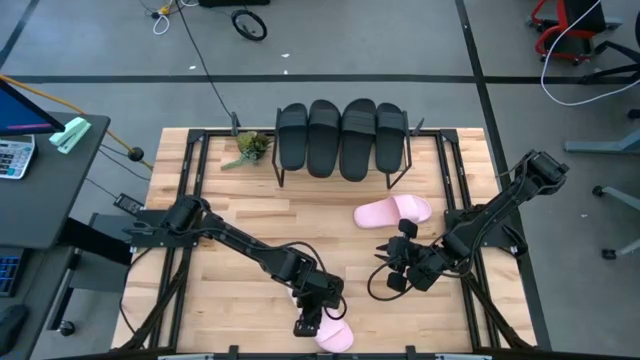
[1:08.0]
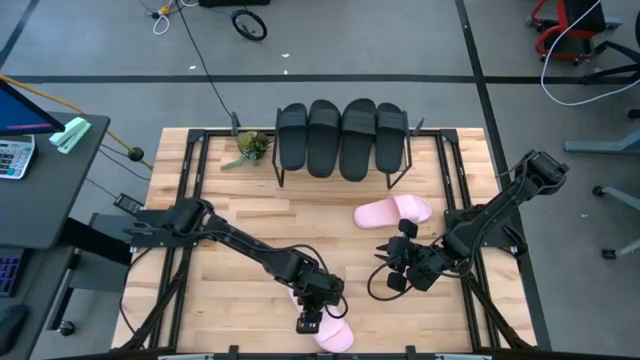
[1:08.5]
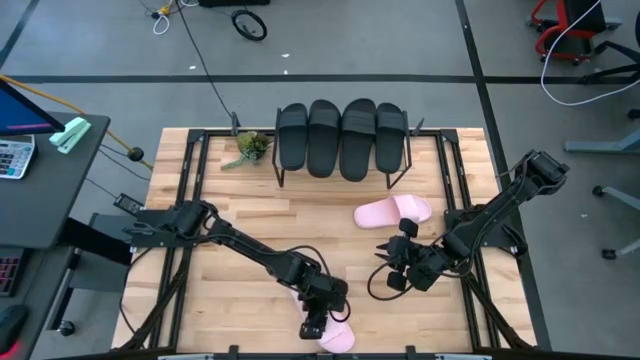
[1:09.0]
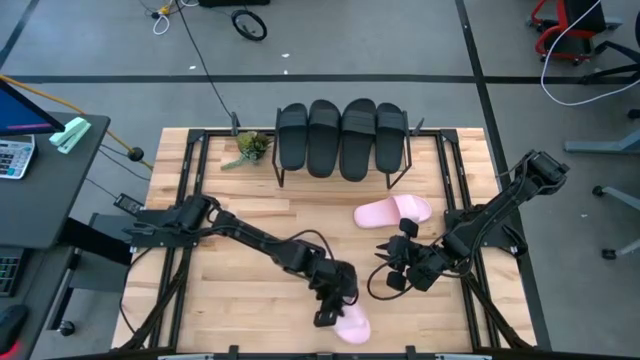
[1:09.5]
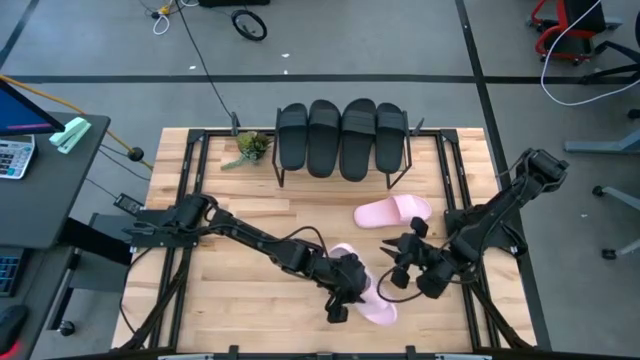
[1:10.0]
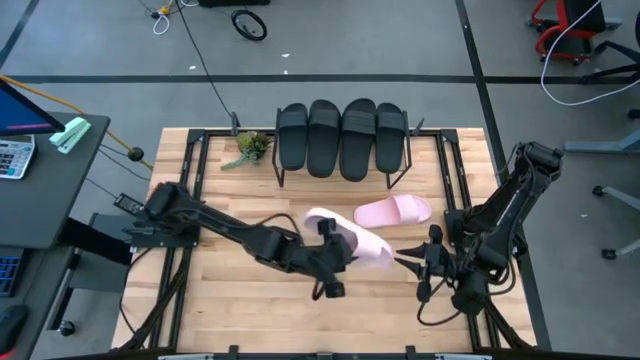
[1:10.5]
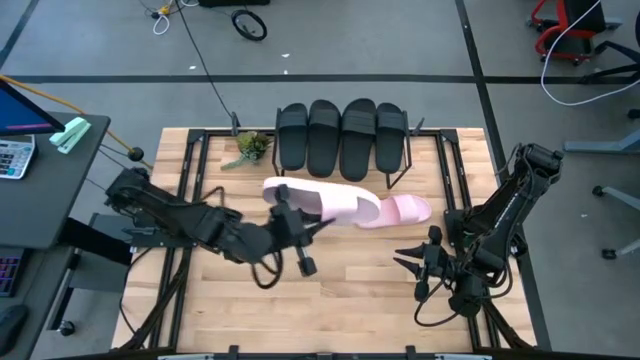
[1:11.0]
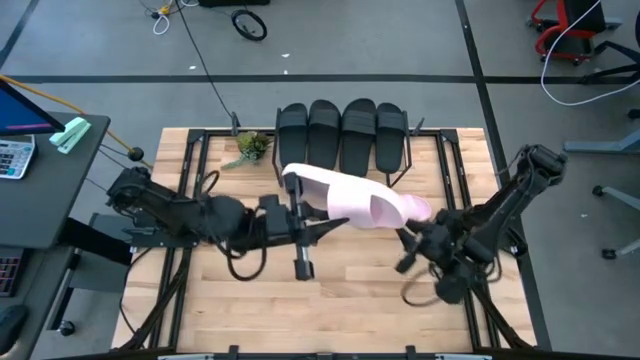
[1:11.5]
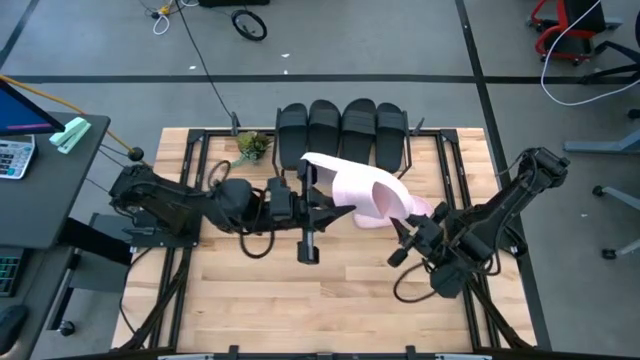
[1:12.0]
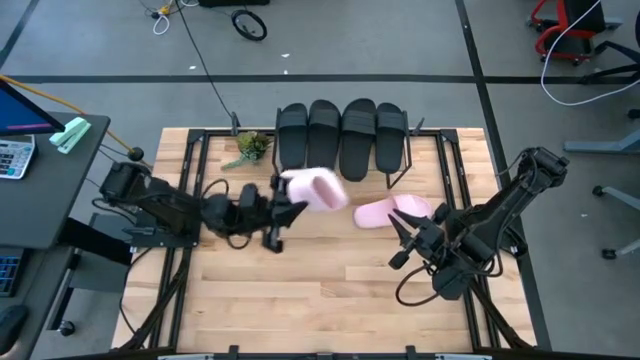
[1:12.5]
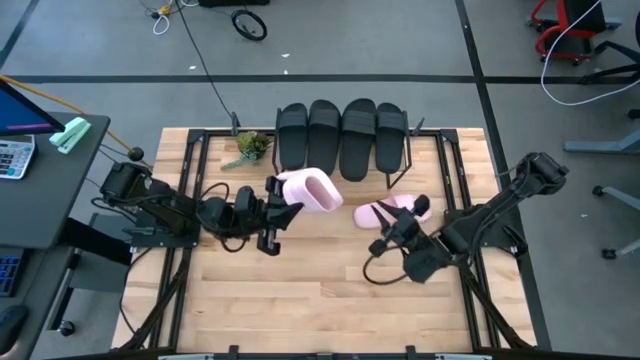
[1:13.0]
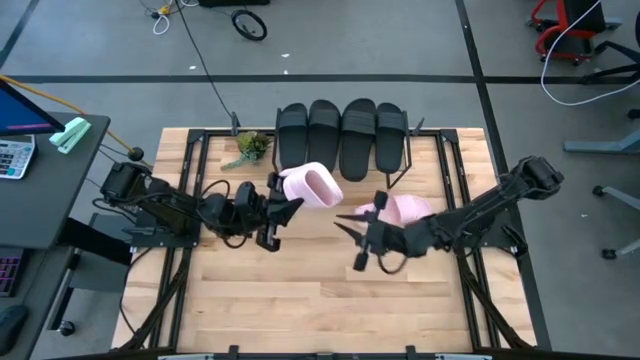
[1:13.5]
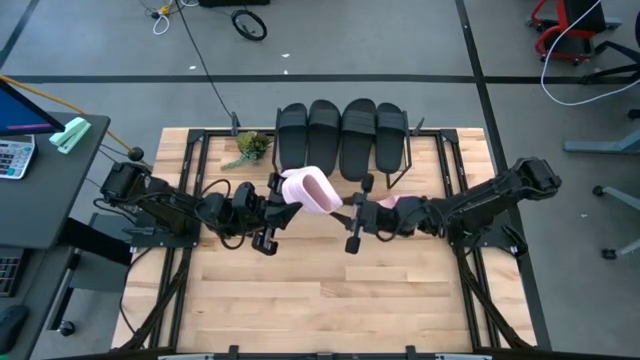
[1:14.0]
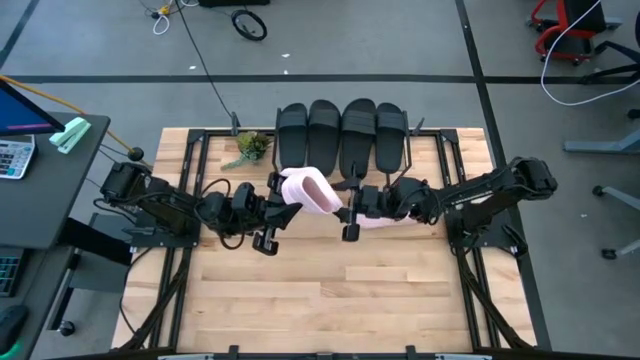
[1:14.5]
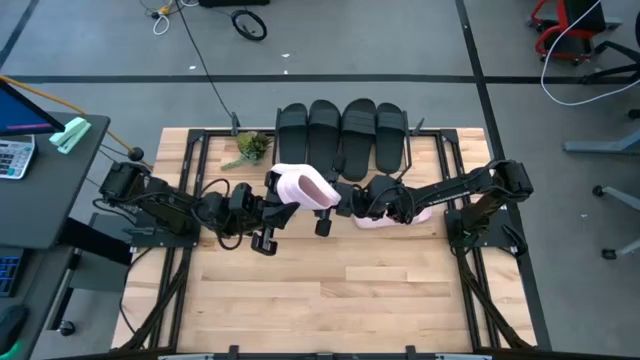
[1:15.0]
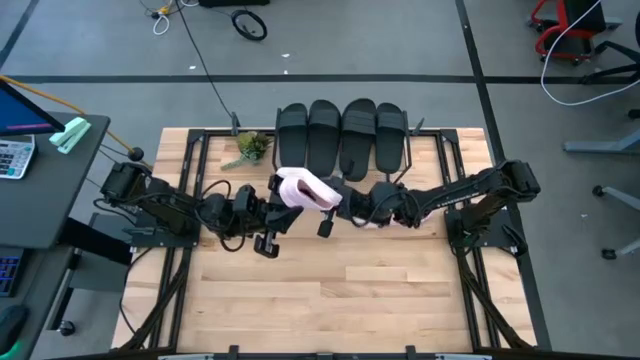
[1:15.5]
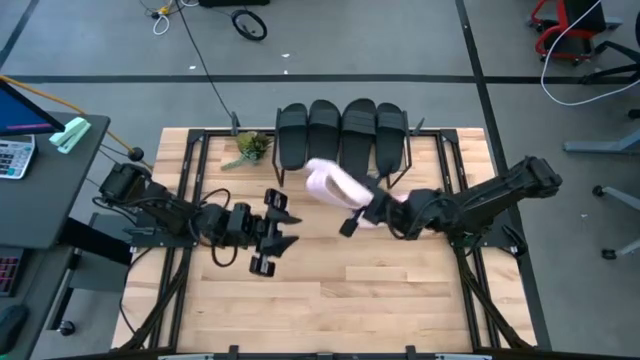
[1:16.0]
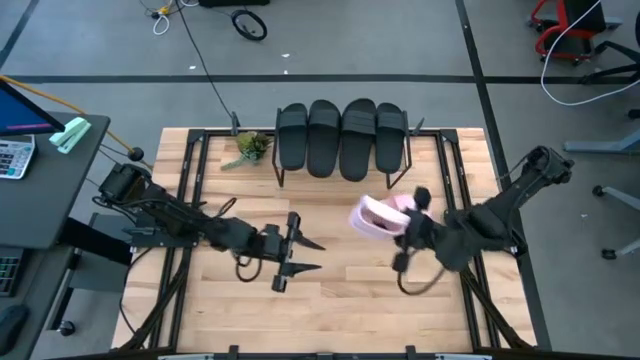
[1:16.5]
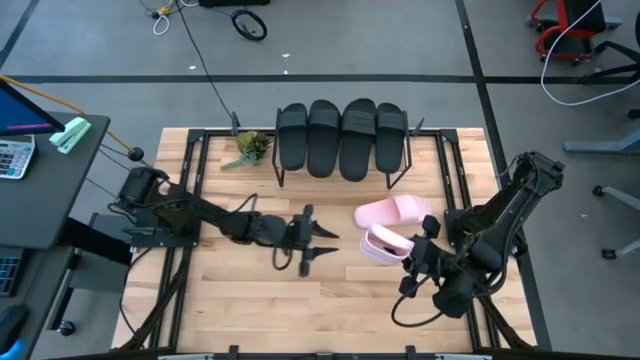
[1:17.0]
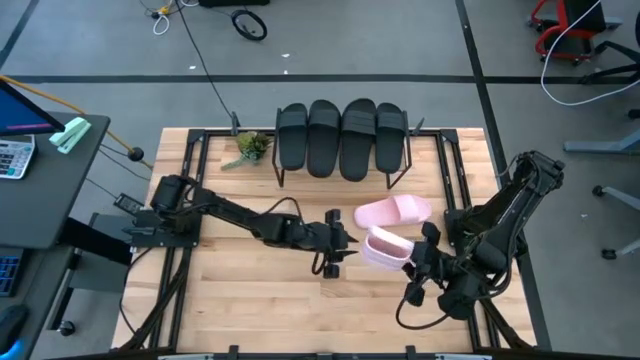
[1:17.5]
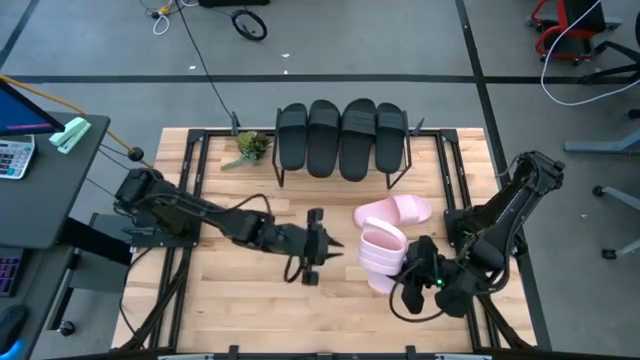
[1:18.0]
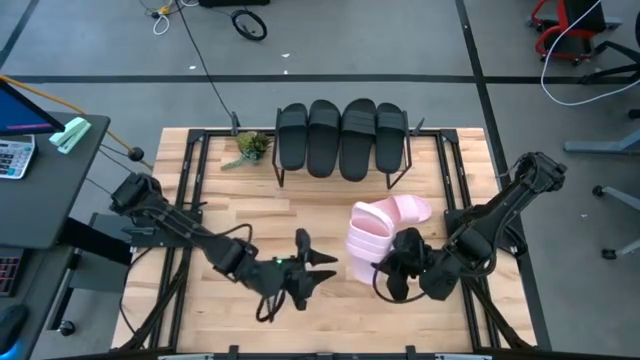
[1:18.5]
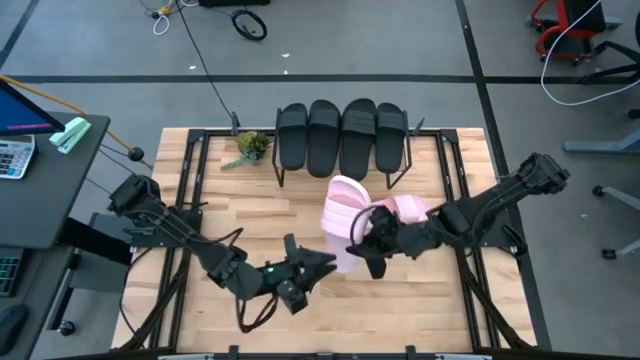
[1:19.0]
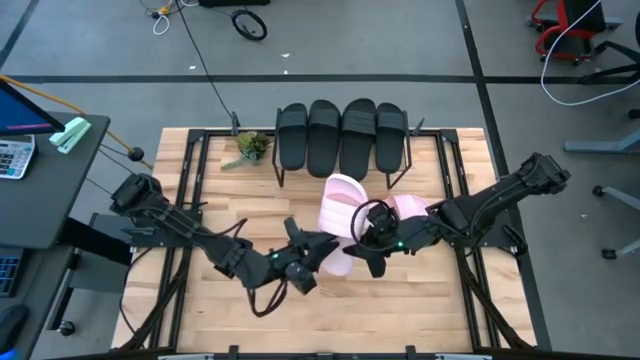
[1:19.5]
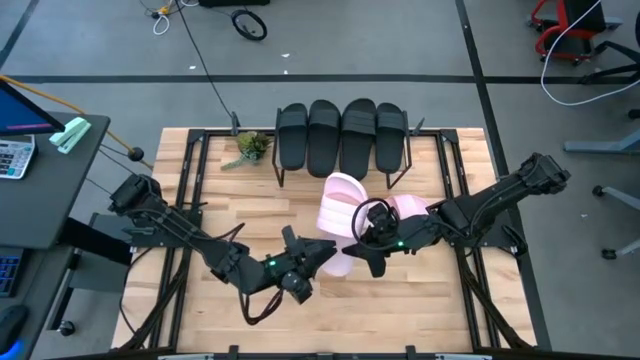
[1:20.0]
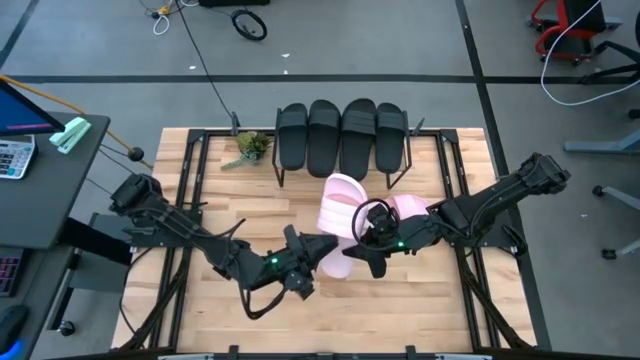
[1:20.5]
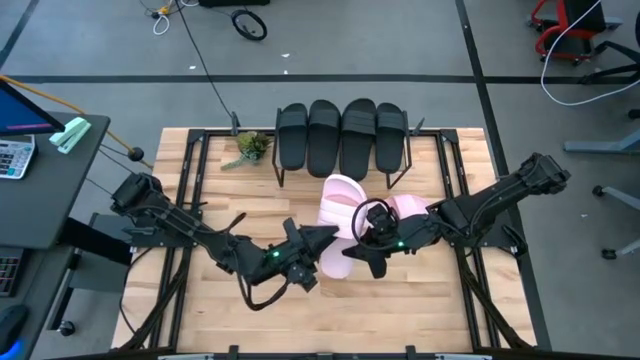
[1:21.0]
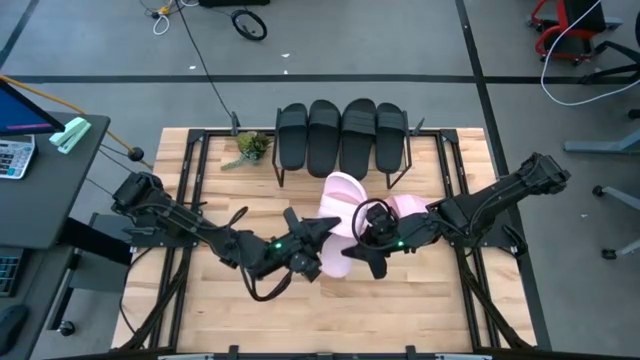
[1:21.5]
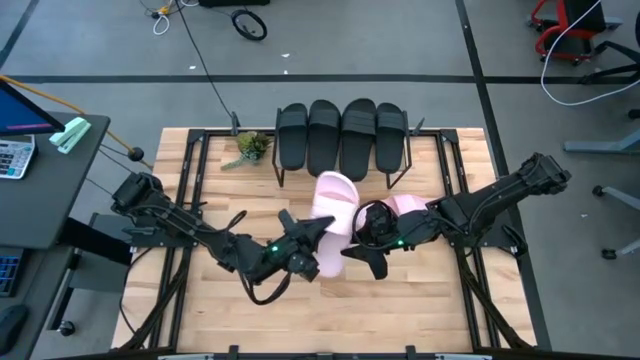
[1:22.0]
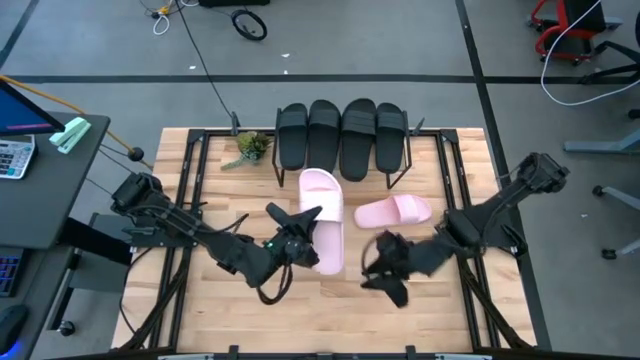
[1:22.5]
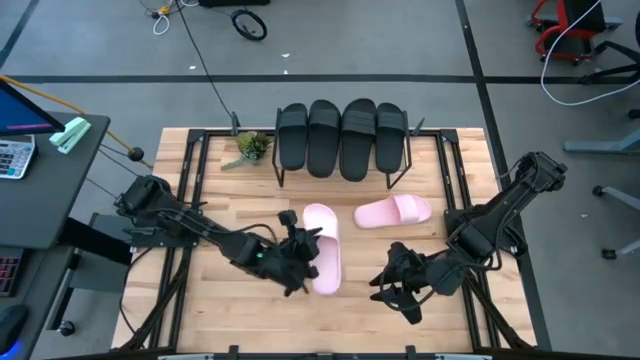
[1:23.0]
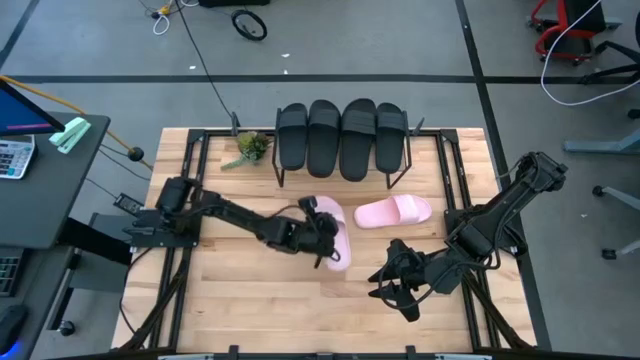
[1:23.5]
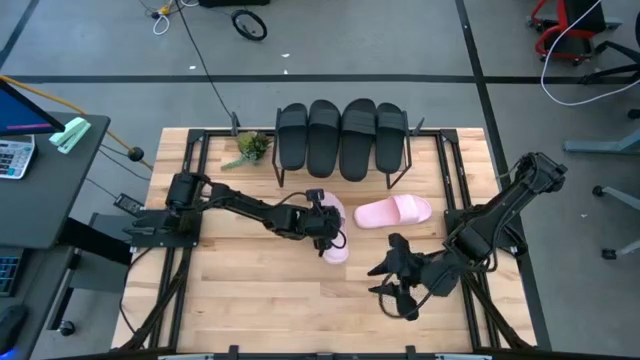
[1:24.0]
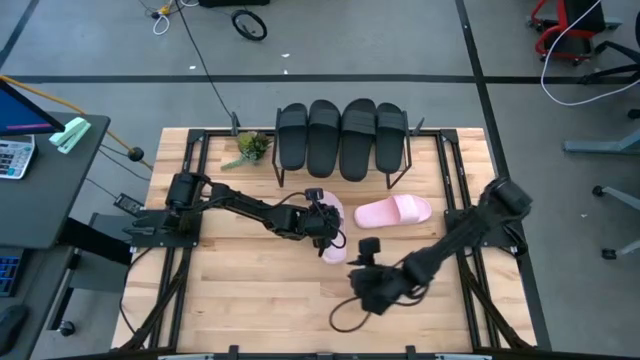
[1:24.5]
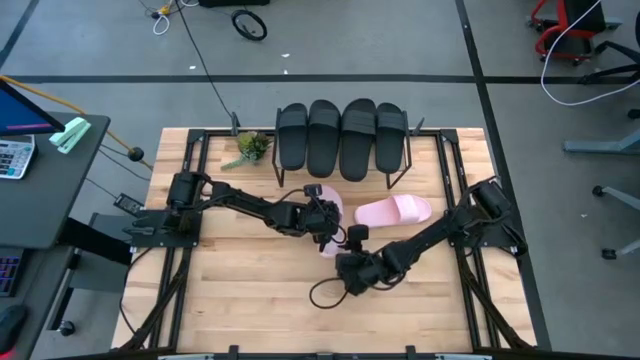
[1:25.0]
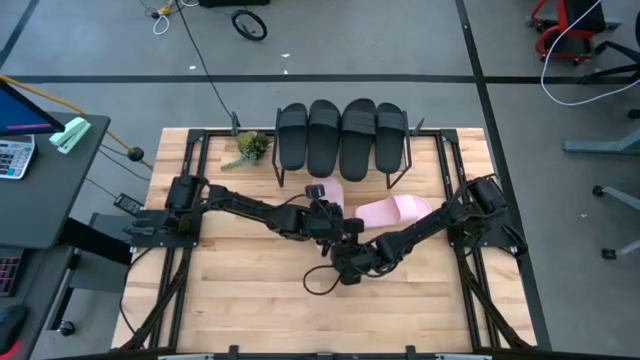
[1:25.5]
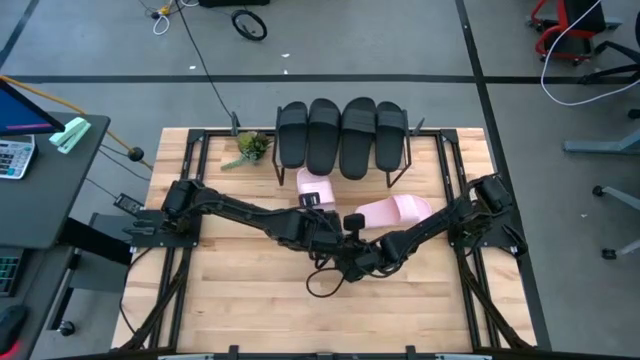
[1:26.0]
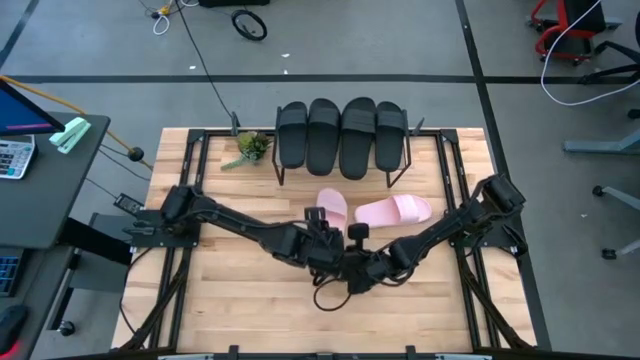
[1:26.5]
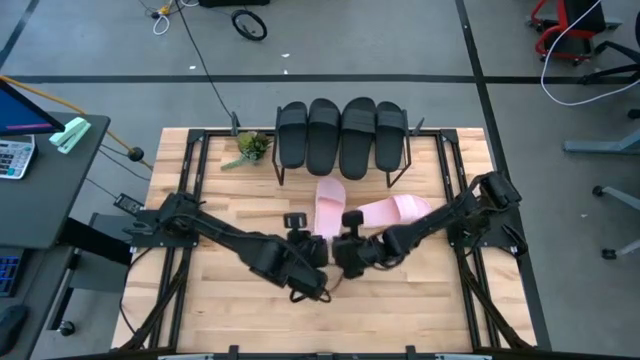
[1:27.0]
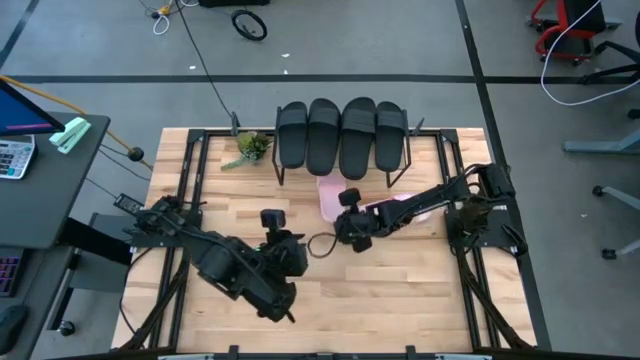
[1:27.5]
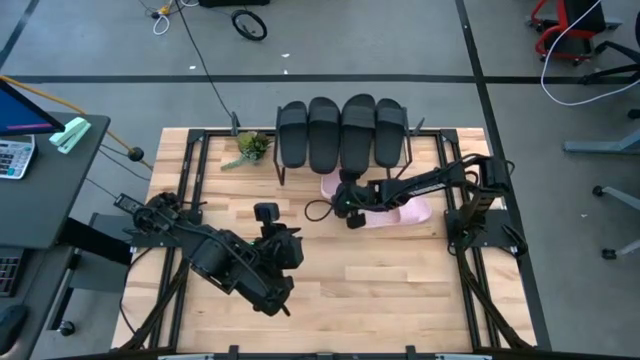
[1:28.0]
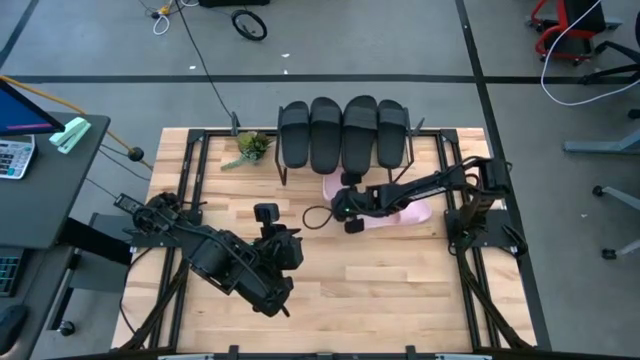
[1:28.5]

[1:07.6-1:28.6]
Task: Pick and place slides into the shelf
Put the pink slide under the shelf

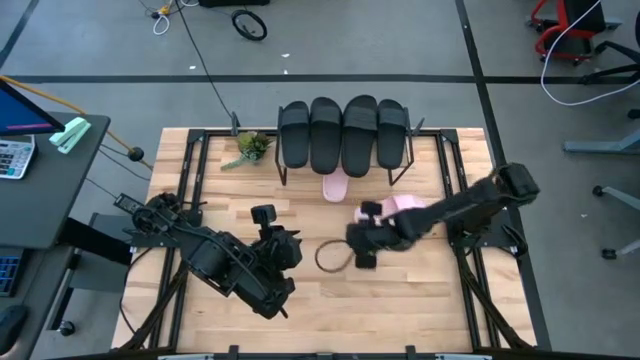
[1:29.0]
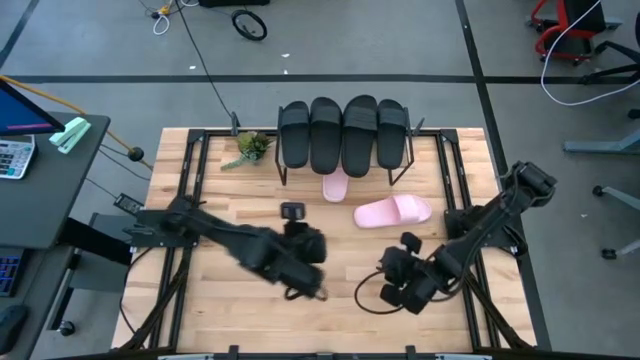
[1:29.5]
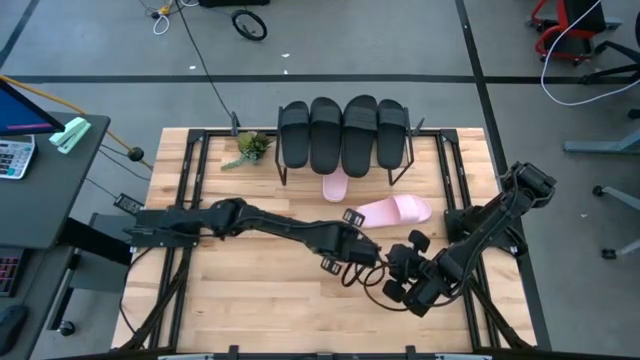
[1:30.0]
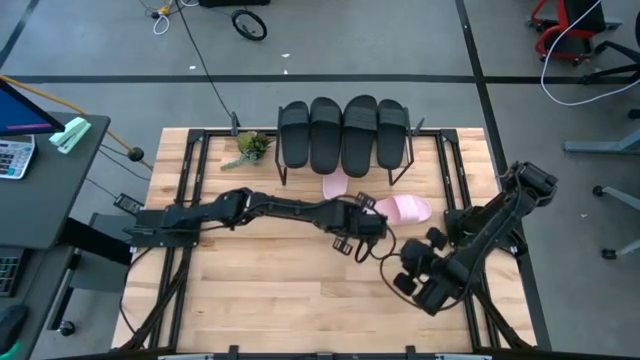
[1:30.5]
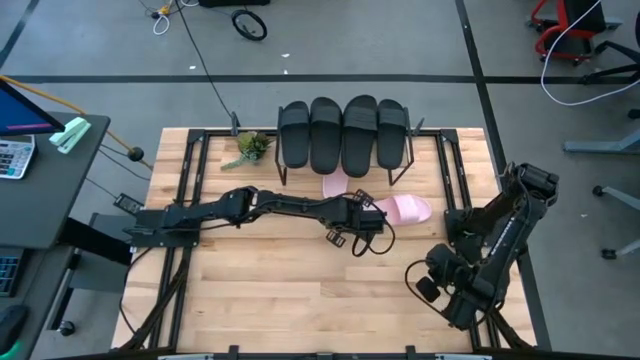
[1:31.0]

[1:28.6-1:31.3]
Put the pink slide under the shelf
